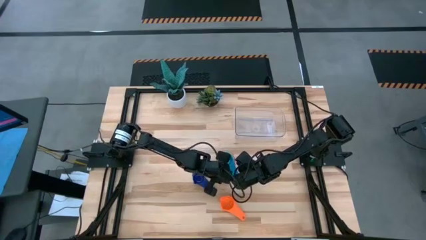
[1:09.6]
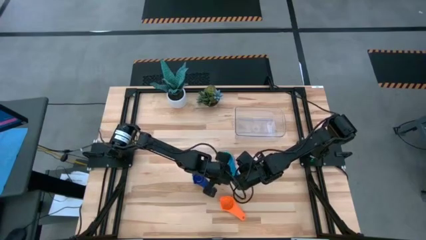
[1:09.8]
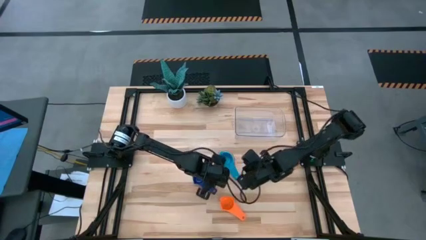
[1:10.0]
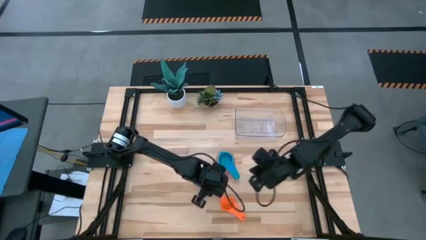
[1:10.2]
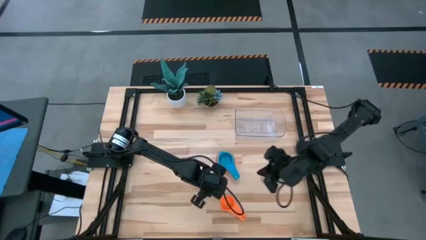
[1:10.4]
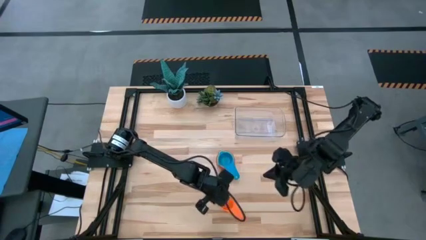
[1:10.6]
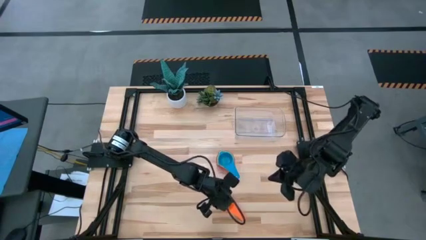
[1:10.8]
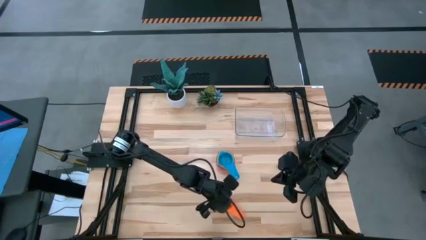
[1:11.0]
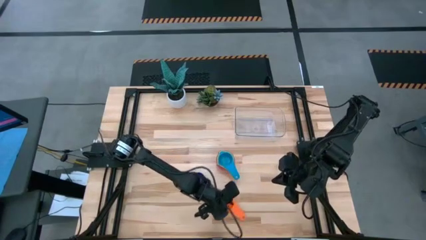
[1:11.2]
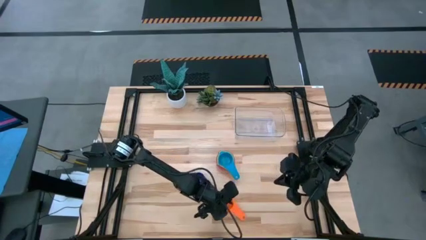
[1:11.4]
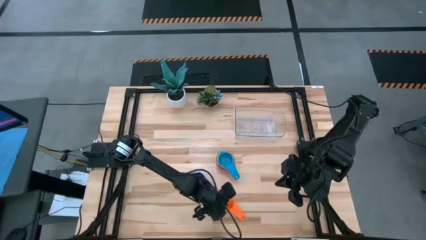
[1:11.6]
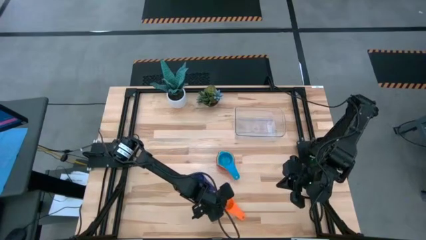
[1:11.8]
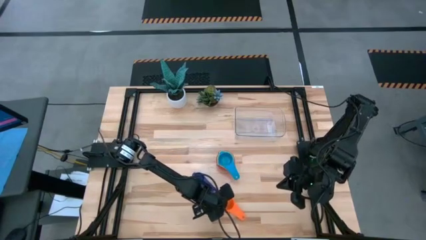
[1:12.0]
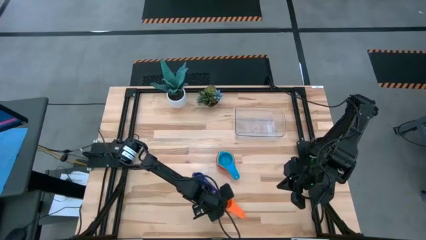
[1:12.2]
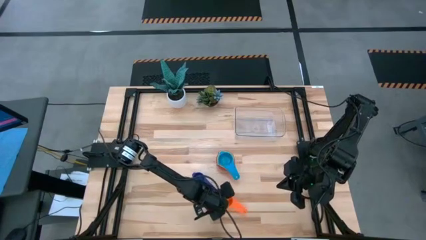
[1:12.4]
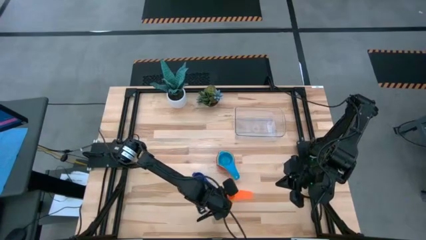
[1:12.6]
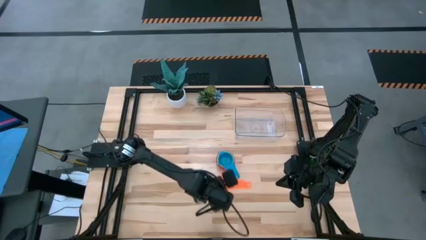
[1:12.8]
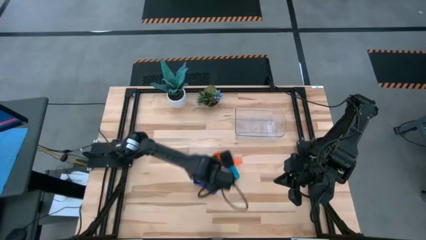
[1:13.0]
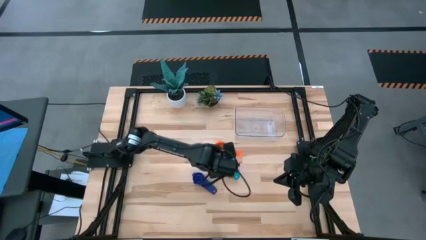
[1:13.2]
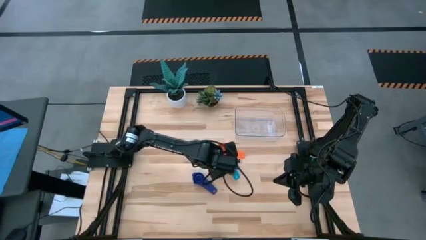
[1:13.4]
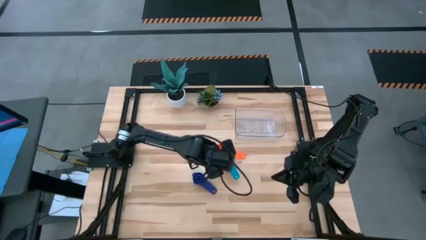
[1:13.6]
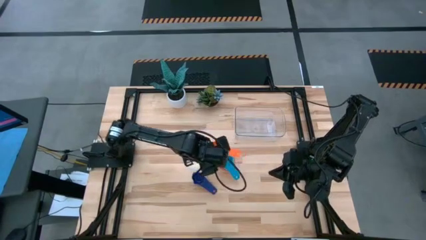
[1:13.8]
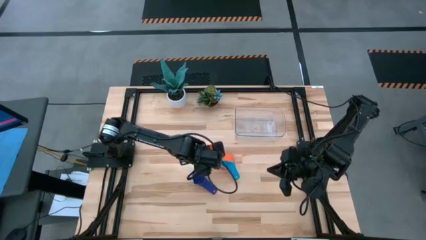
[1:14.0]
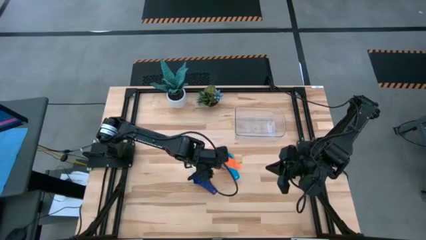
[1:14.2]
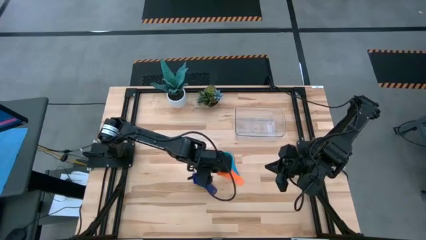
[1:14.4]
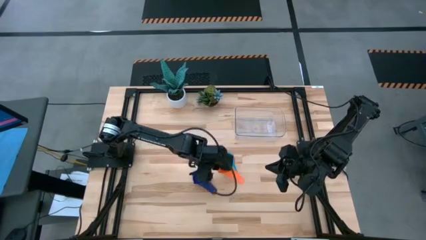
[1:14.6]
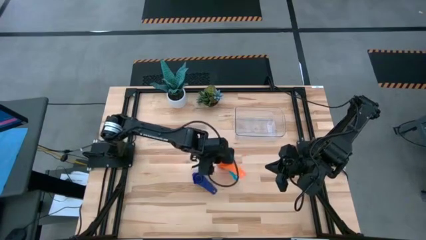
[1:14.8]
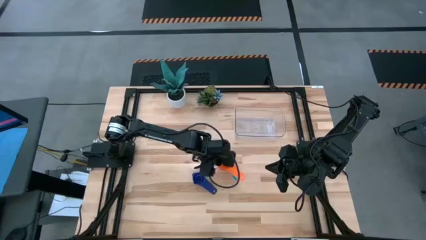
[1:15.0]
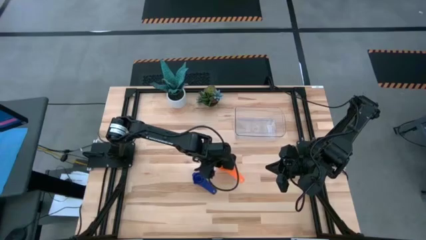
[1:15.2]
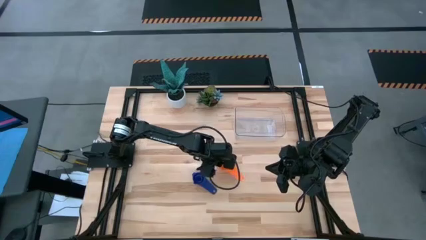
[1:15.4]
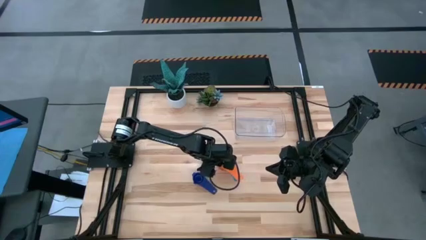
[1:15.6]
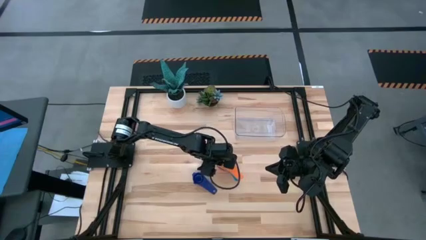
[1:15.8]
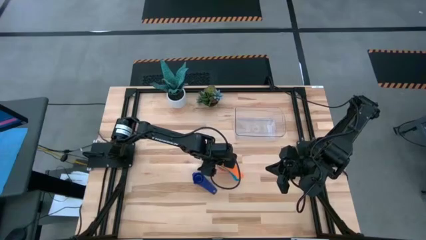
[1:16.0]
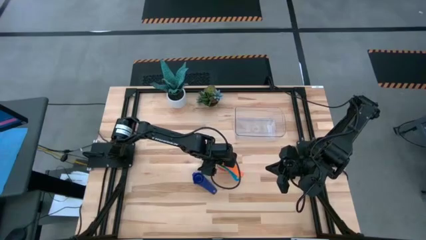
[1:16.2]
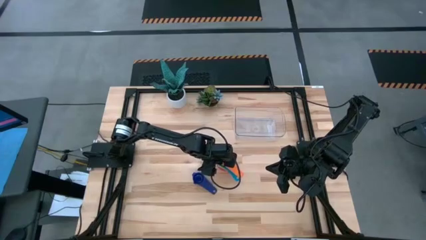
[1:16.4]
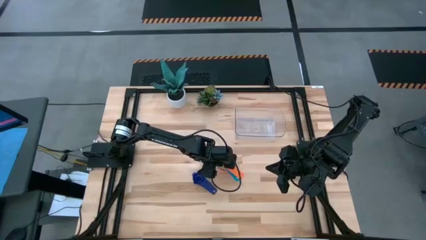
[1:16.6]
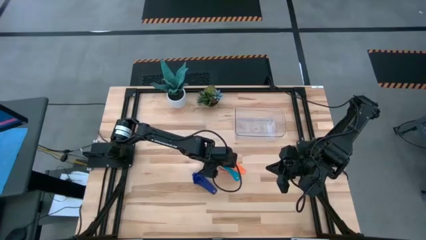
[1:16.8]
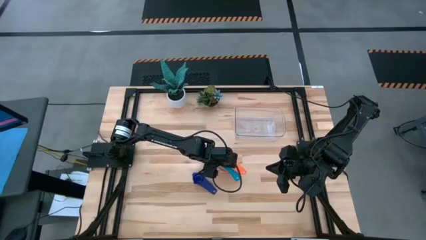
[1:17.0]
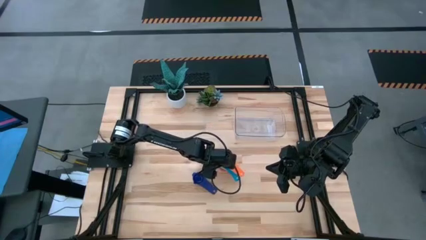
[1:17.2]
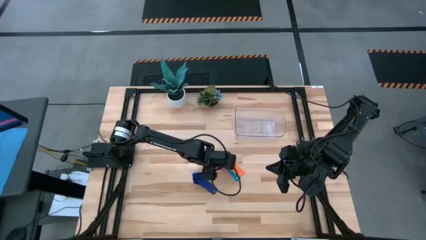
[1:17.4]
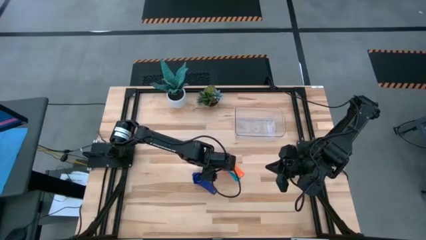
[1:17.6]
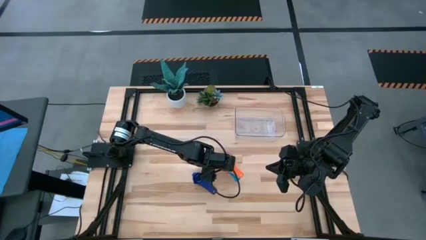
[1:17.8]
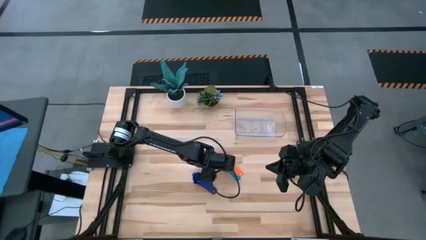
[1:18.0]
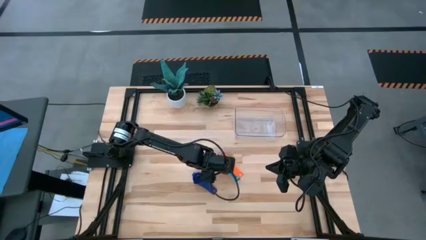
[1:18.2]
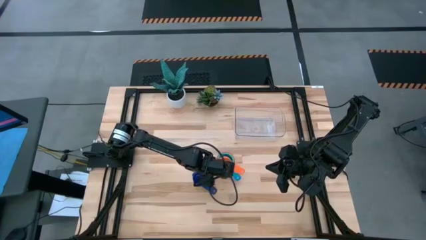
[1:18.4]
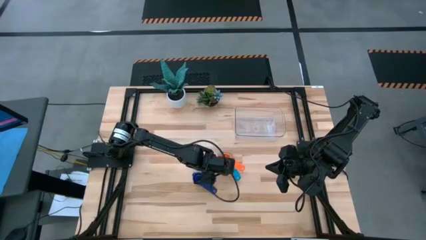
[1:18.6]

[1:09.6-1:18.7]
Task: Nest measuring cups in basket
Stack the orange measuring cup on top of the light blue measuring cup

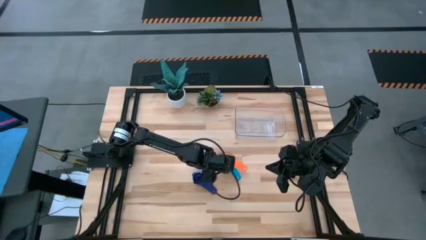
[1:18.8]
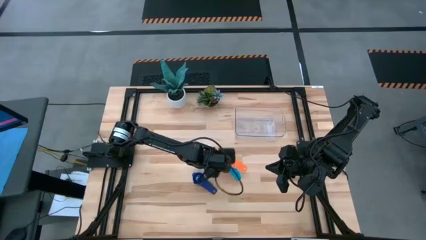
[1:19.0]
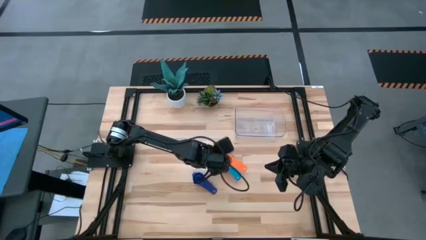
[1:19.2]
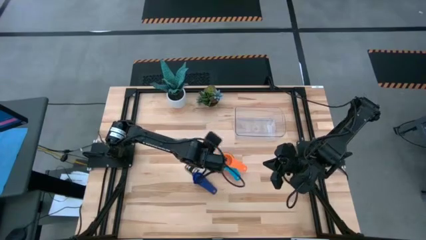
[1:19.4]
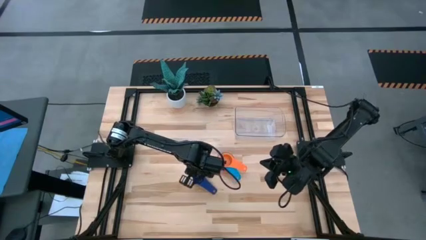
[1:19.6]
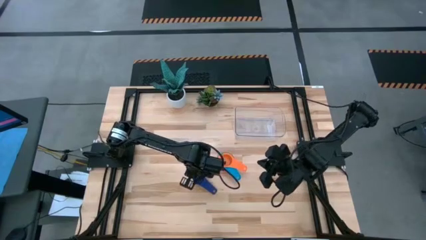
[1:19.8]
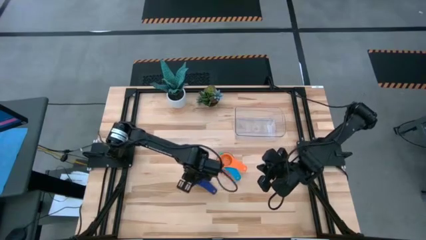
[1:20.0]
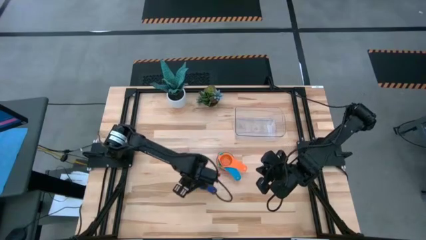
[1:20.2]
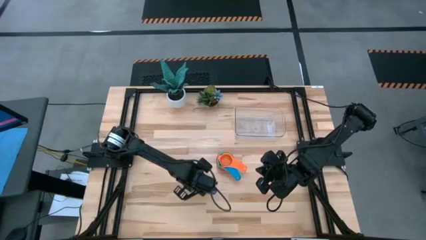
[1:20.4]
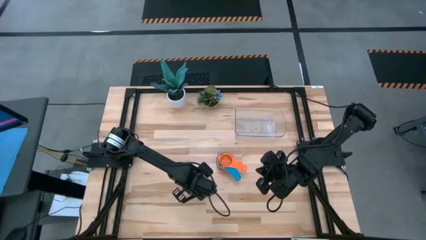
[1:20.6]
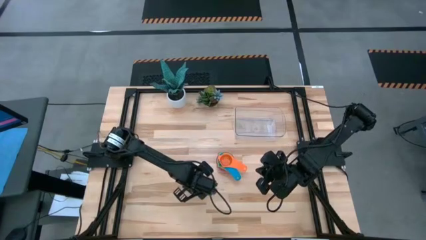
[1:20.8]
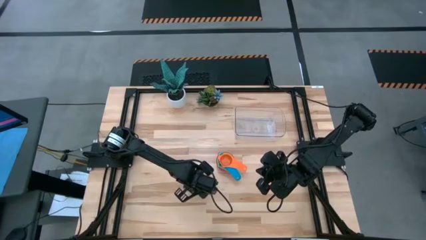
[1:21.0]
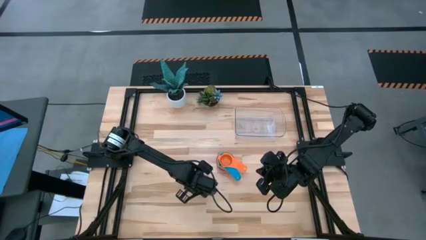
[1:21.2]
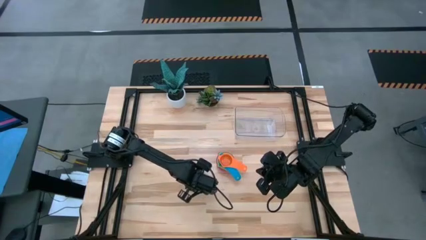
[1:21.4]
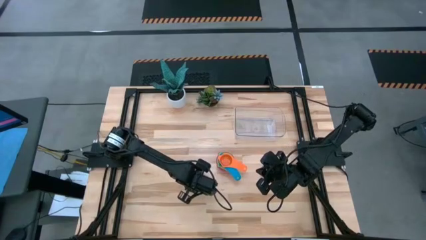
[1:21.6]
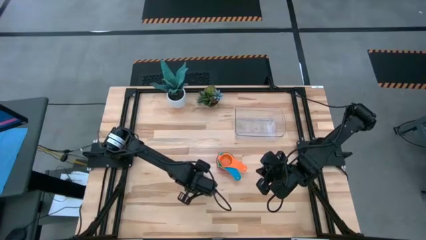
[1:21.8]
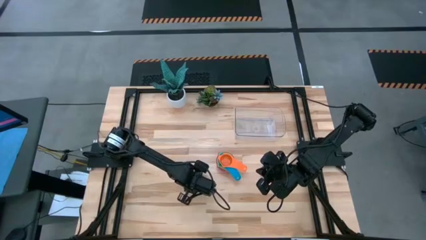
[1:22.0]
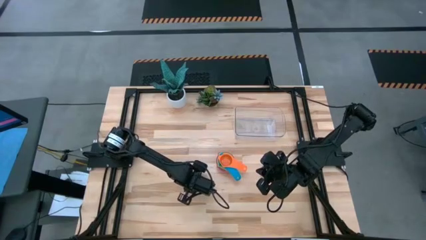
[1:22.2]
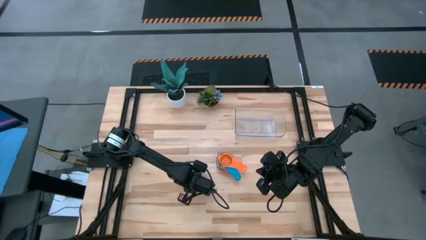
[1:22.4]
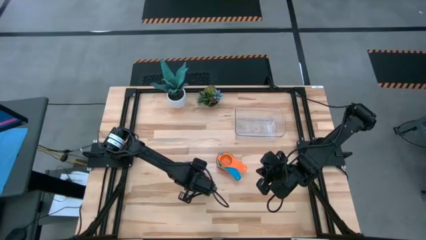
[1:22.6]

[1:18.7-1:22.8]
Stack the dark blue measuring cup on top of the orange measuring cup

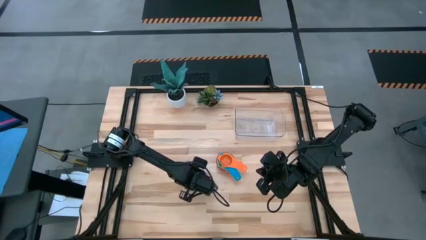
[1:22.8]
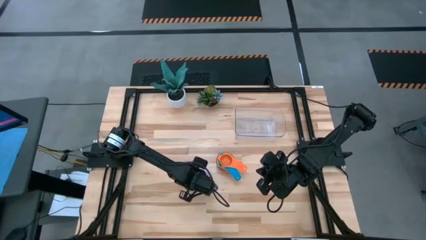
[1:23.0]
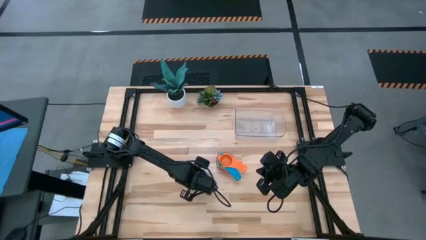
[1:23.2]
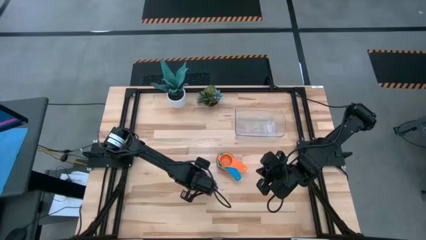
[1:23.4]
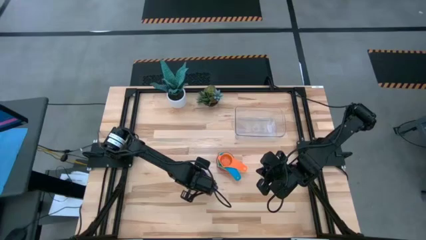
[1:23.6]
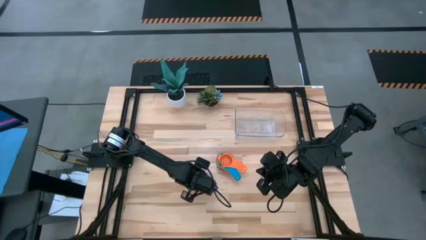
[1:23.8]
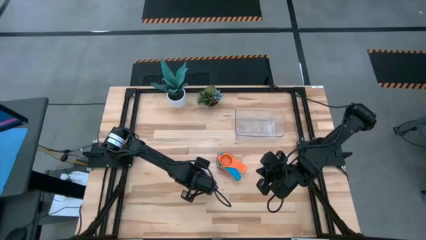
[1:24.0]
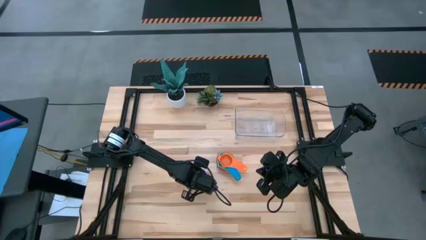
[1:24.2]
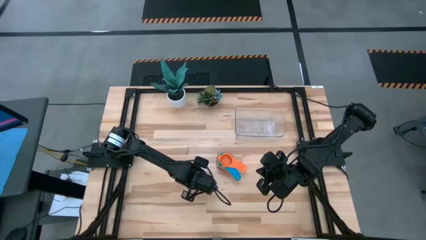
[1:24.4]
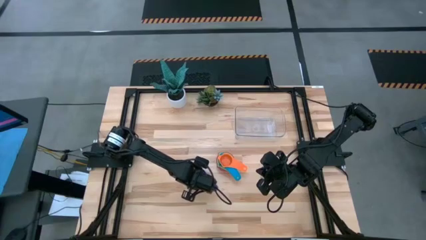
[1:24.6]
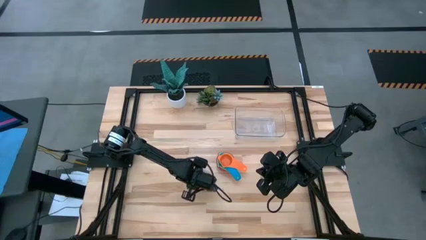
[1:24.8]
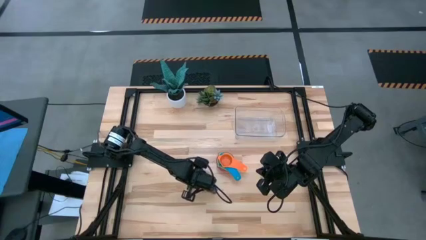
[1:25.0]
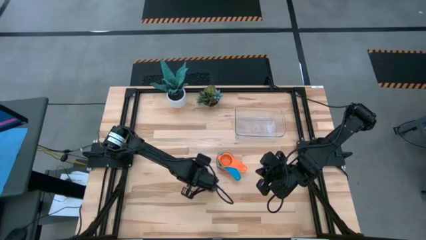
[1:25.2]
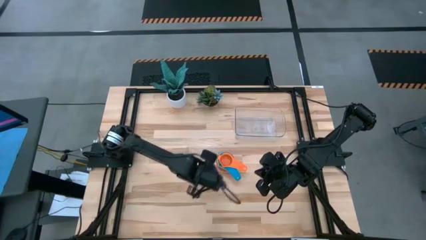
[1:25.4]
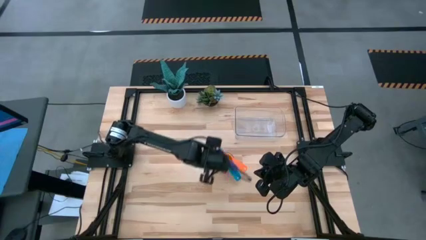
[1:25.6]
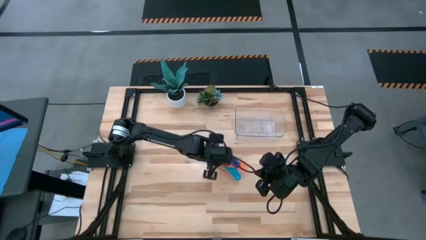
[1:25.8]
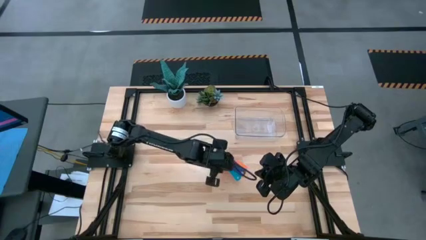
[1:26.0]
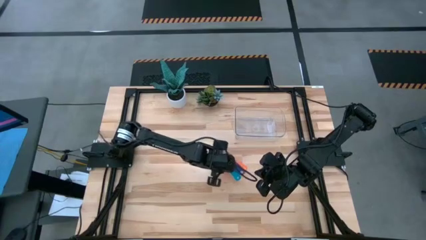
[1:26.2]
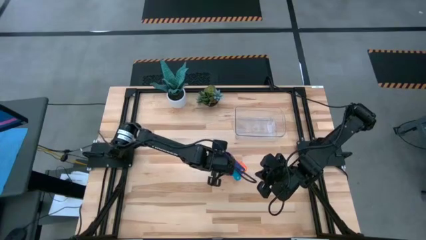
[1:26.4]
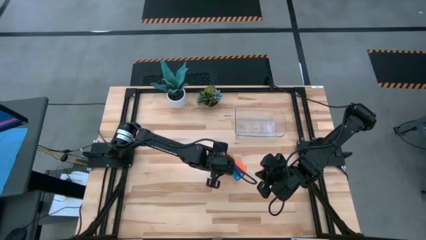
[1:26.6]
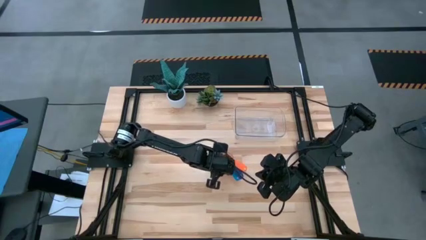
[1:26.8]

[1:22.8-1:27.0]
Stack the dark blue measuring cup on top of the orange measuring cup
